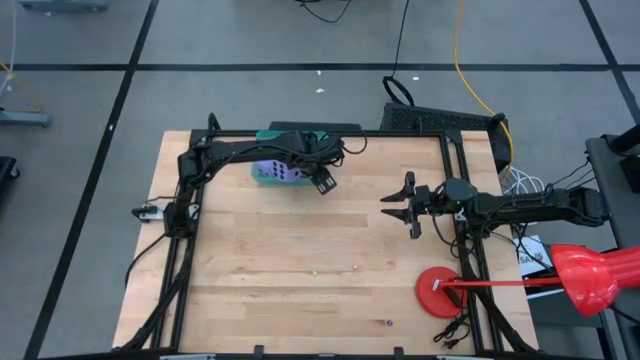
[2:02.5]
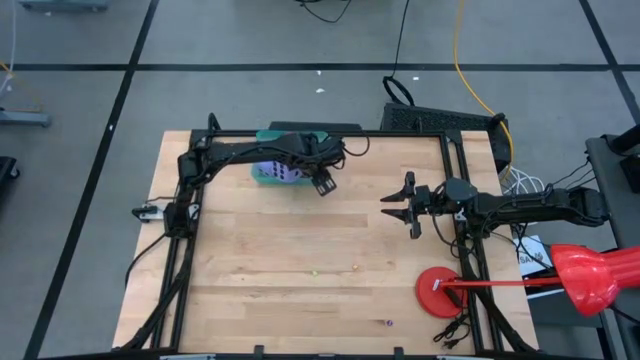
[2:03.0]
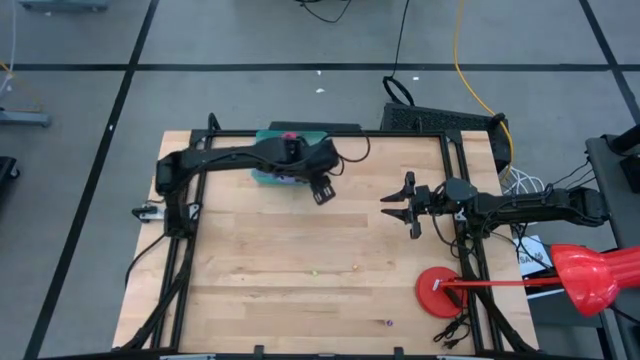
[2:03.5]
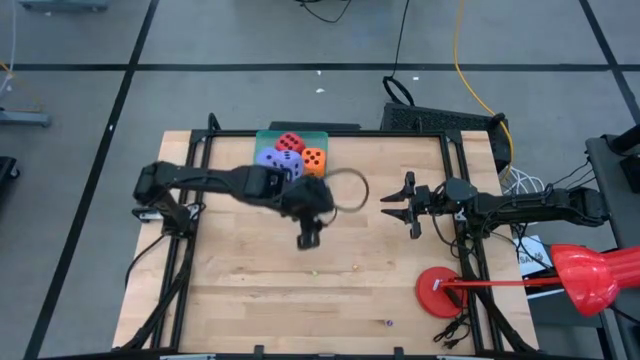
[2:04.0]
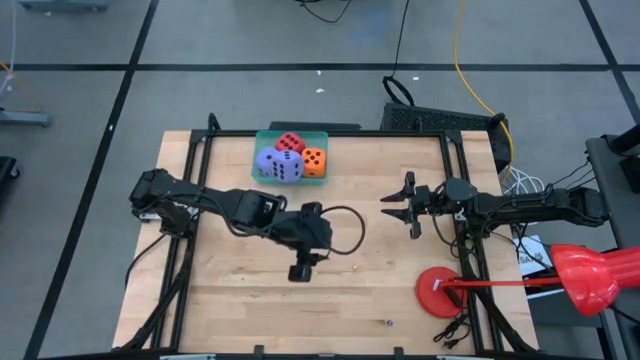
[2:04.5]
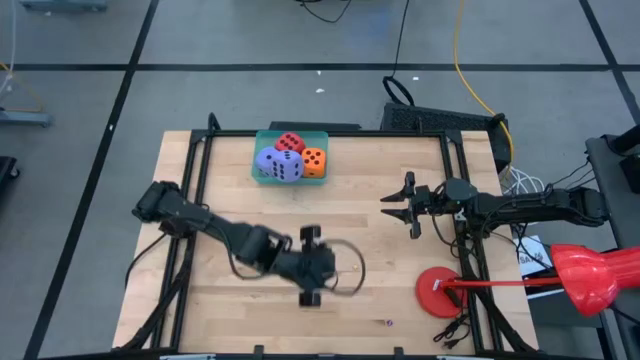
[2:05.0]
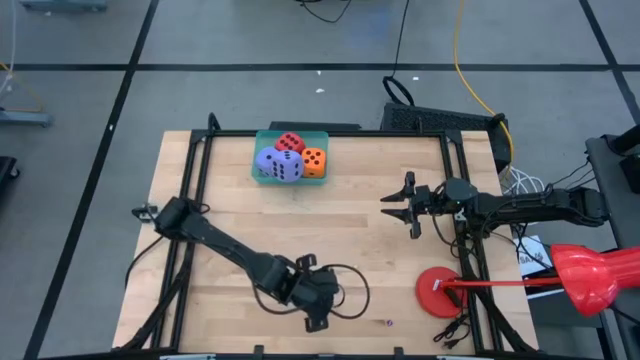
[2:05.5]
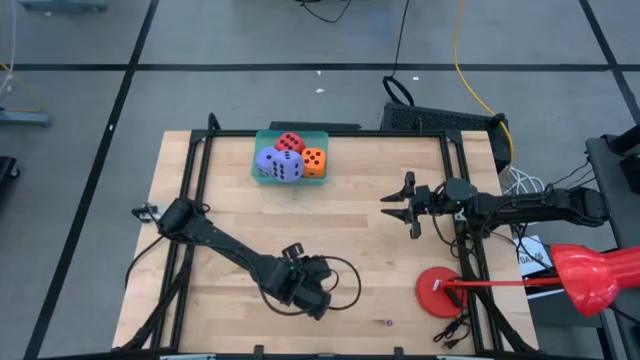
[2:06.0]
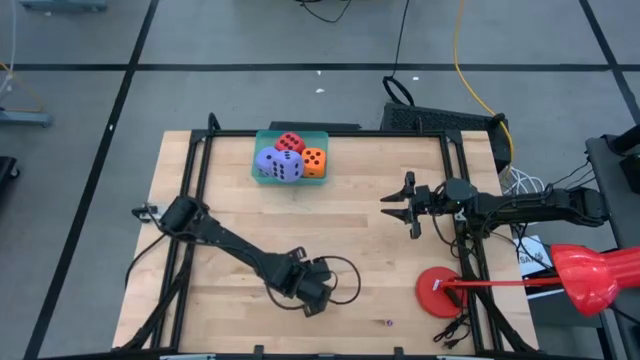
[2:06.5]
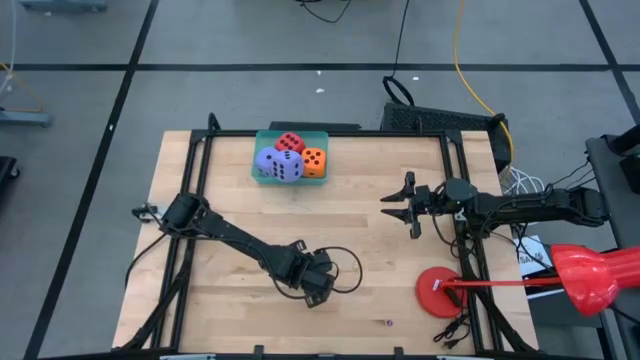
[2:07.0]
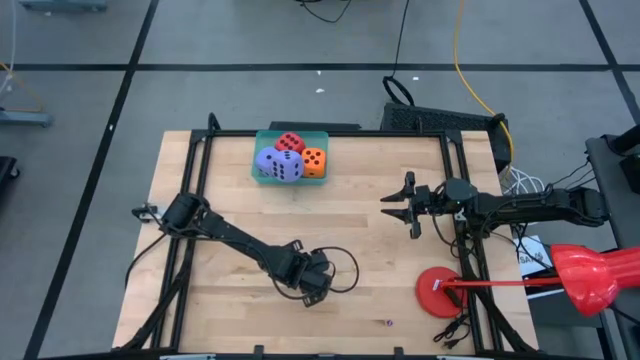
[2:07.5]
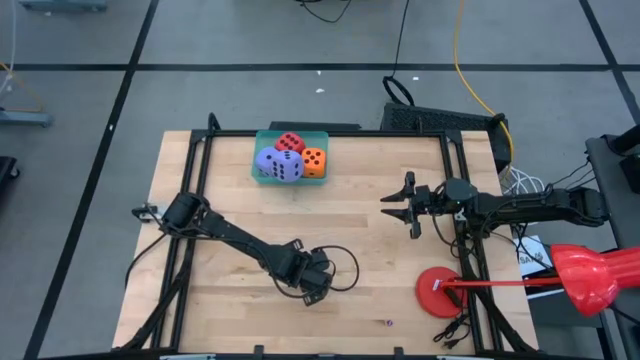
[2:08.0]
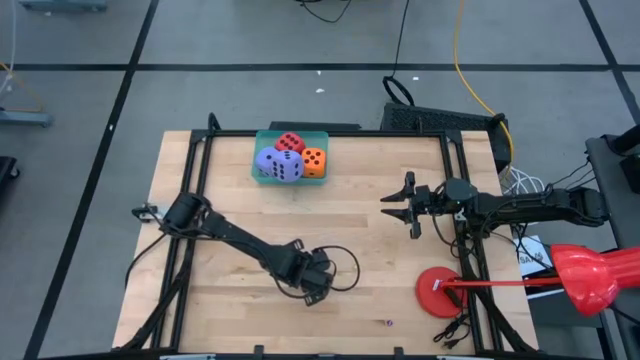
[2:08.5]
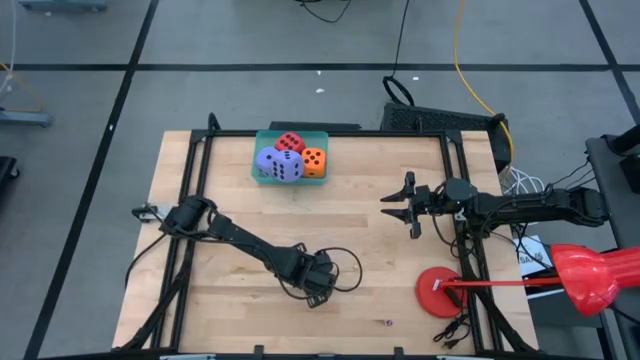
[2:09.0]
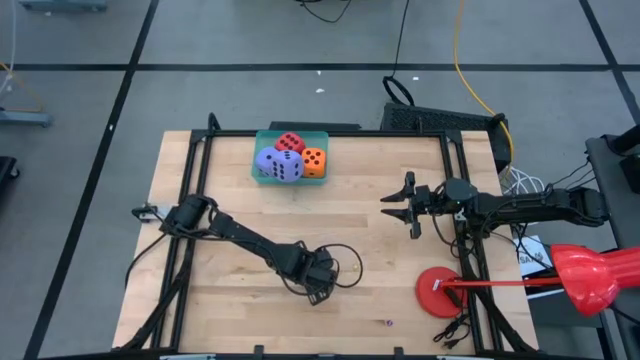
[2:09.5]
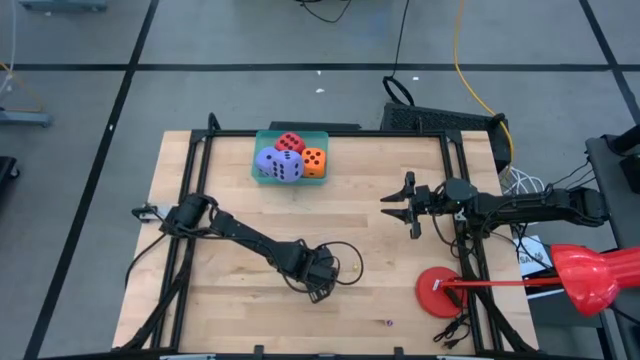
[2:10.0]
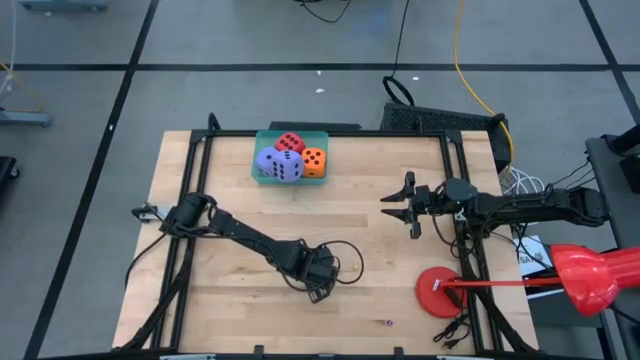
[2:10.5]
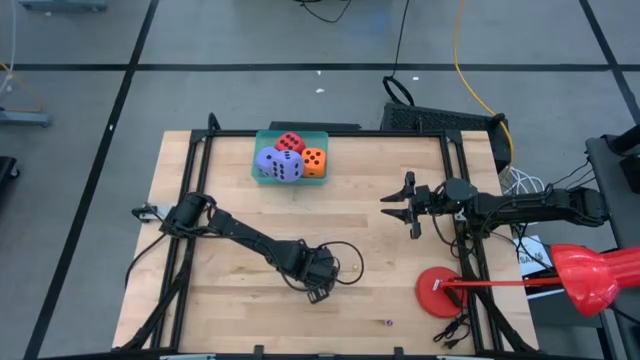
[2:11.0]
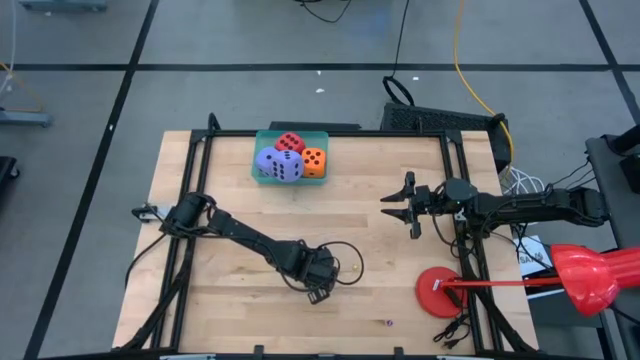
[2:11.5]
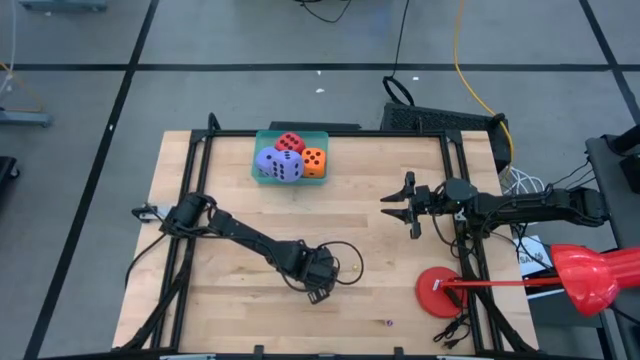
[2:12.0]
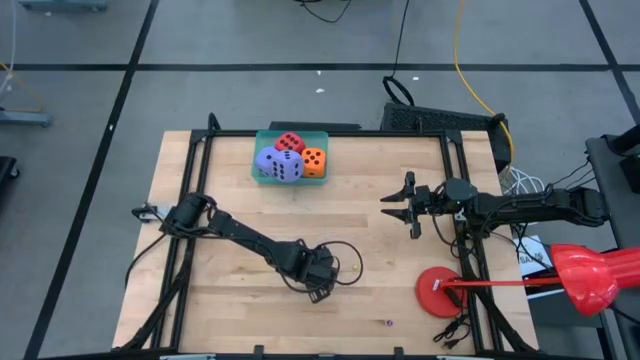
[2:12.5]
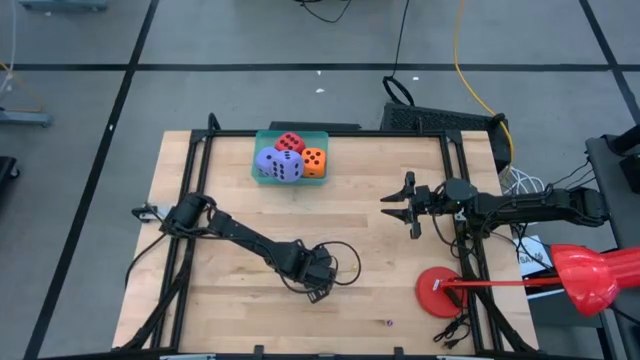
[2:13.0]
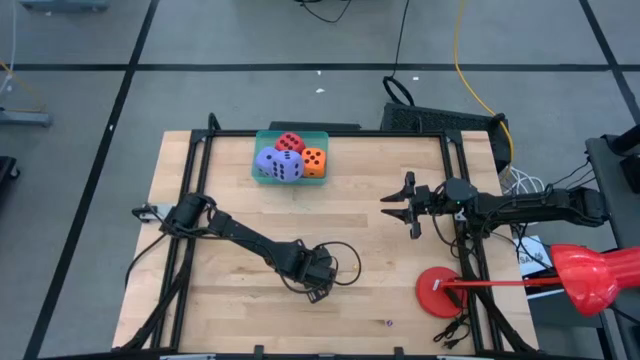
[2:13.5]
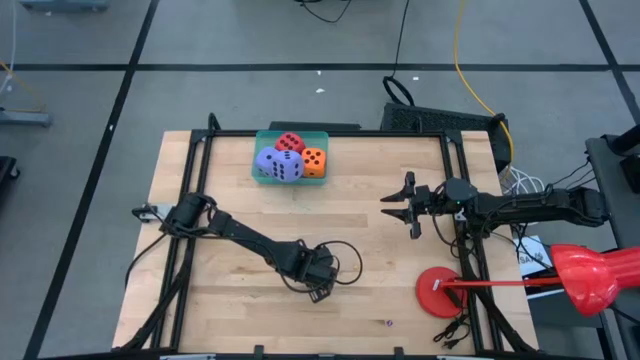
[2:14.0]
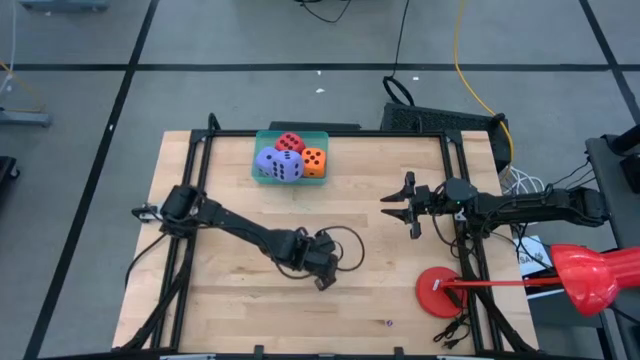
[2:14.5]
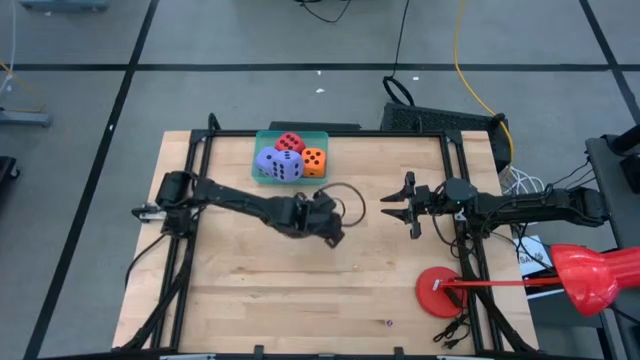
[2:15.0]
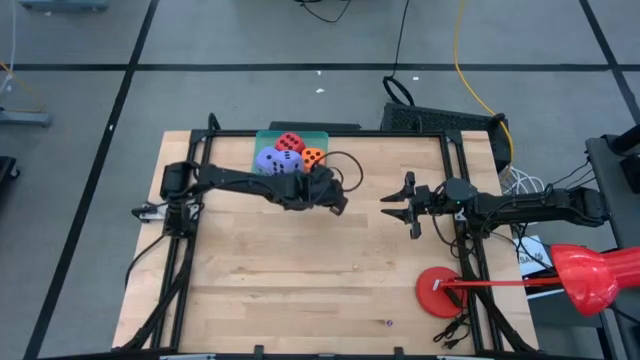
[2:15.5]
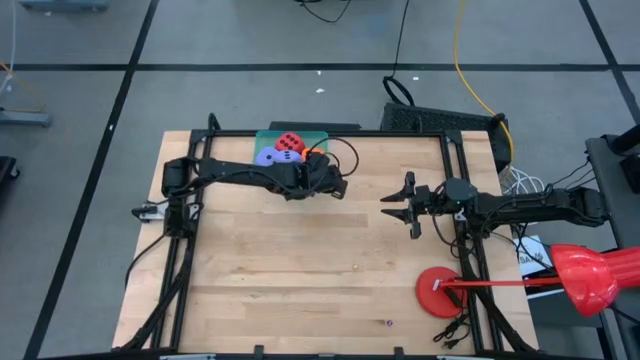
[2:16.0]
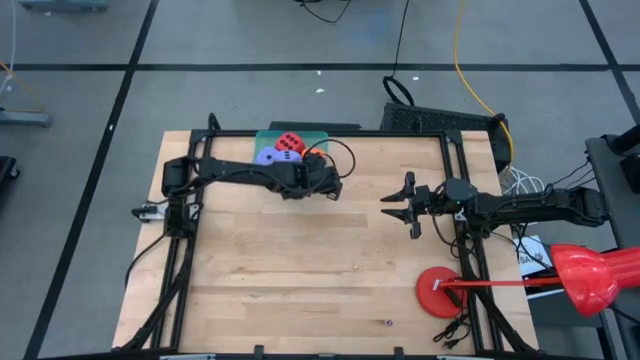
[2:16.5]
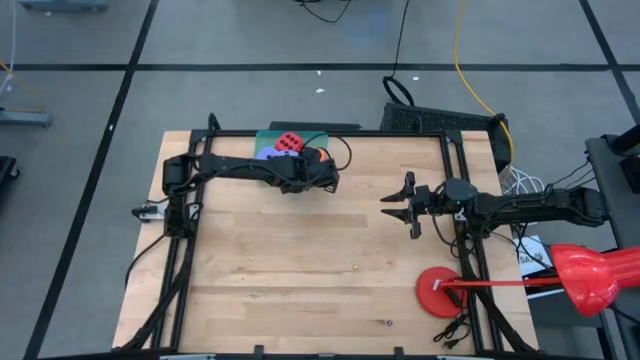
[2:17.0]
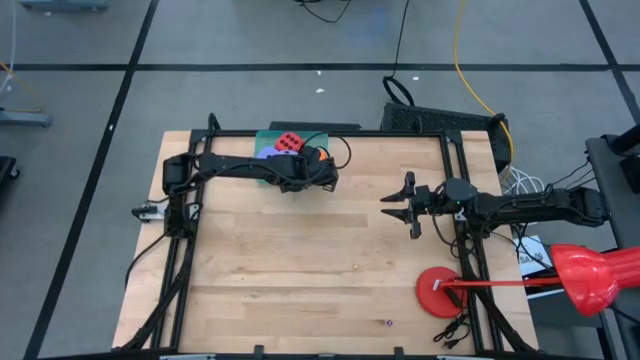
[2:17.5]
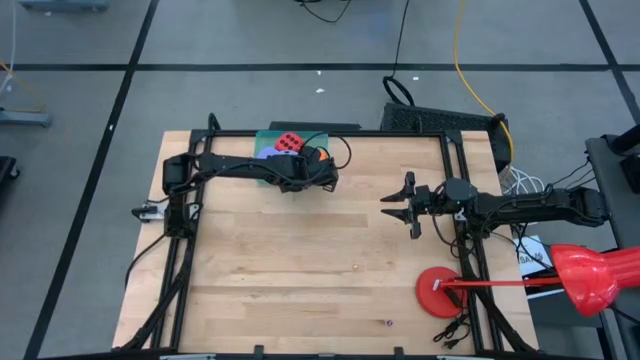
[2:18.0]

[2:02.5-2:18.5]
Task: Pick & Place Dice
Put the small light green dice into the green bin

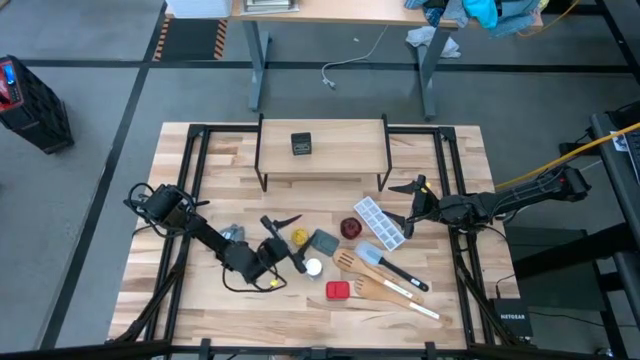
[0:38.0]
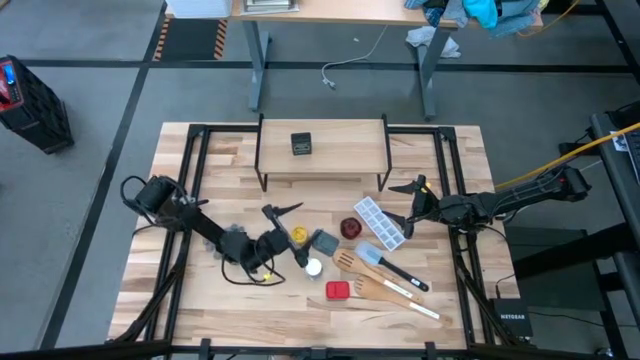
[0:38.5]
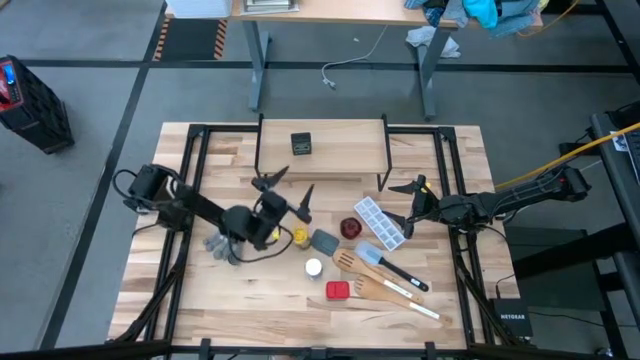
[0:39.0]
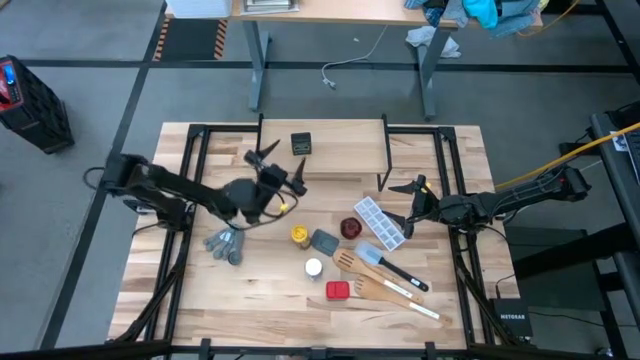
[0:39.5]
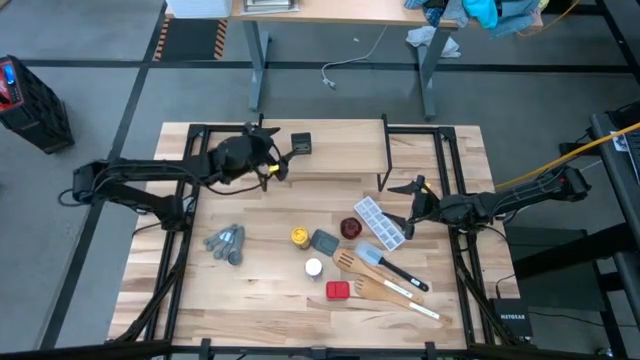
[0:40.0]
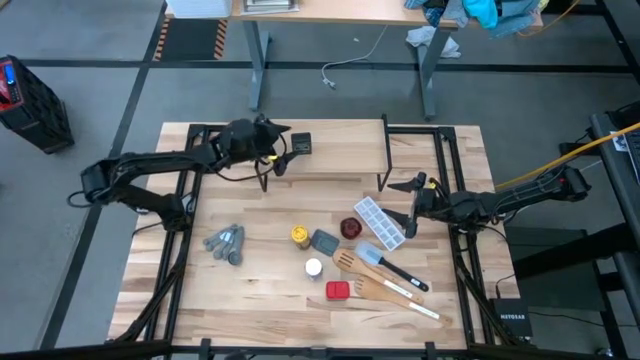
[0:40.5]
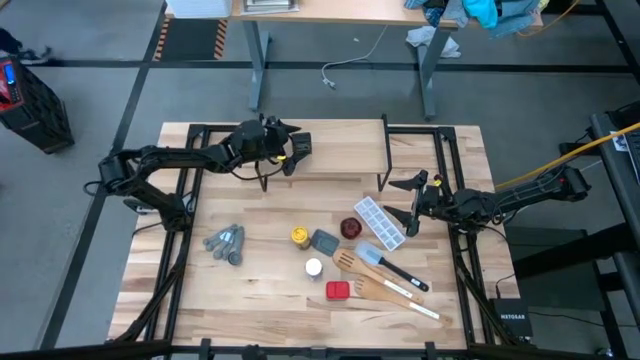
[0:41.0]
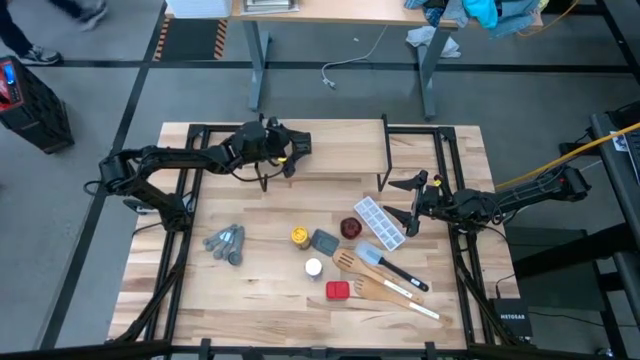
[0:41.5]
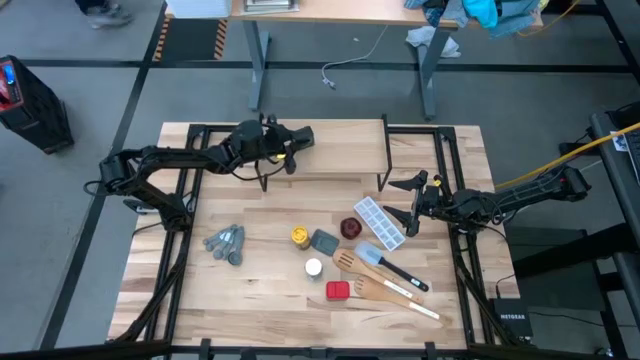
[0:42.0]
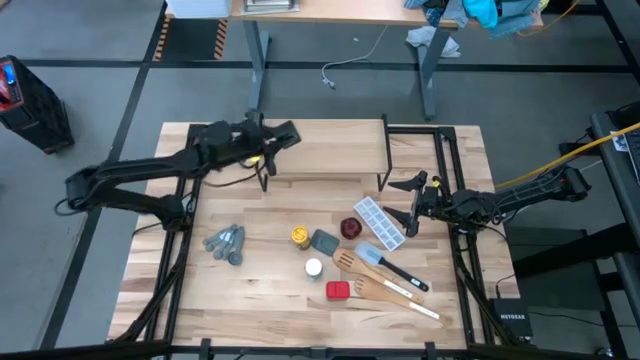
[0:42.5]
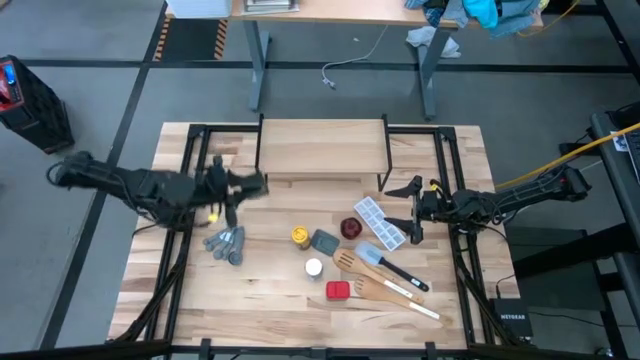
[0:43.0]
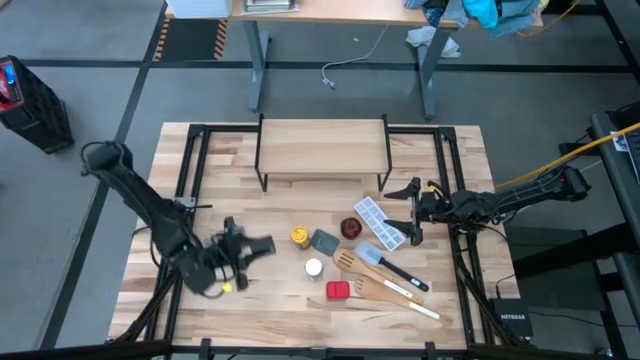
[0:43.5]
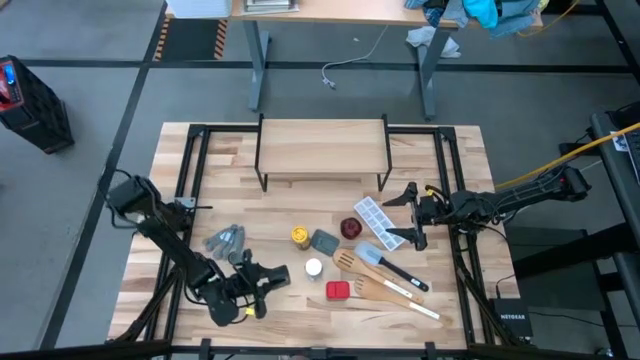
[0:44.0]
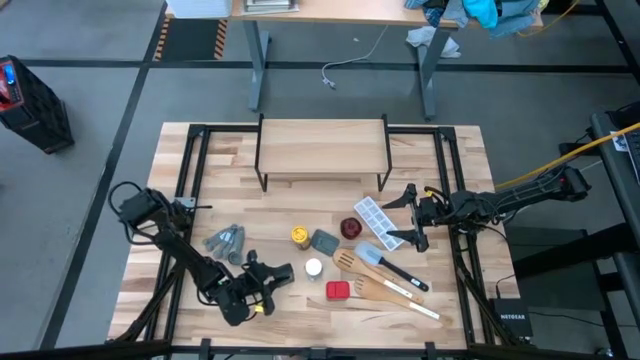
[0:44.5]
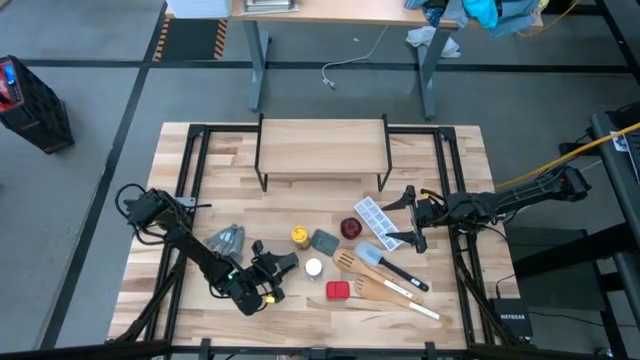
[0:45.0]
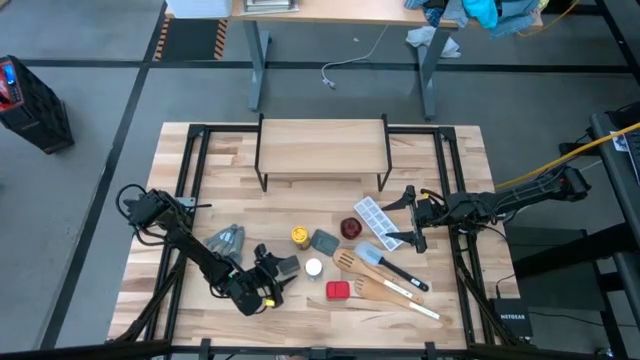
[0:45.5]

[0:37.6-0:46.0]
Task: Shelf spices
Remove the green seasoning can from the shelf
